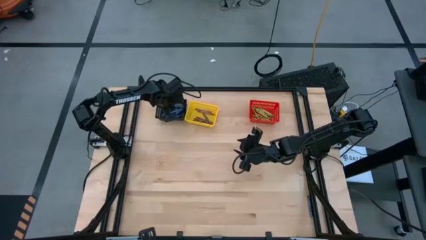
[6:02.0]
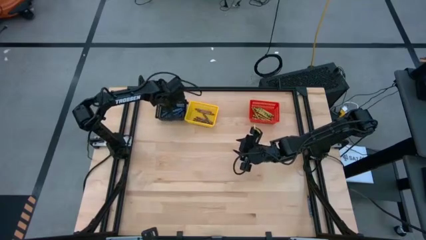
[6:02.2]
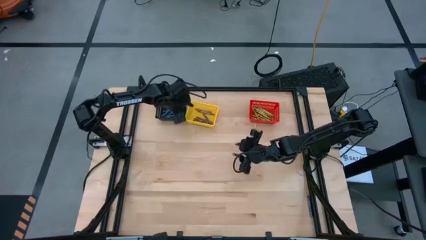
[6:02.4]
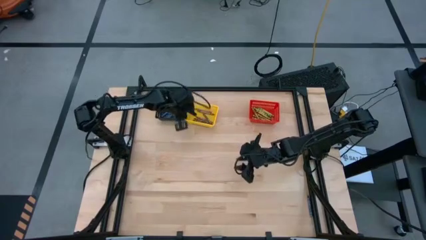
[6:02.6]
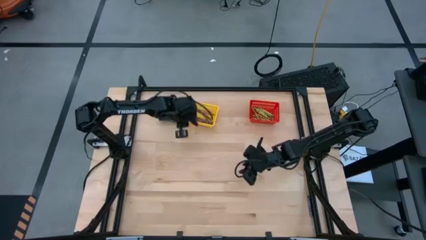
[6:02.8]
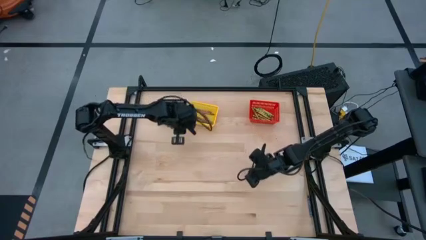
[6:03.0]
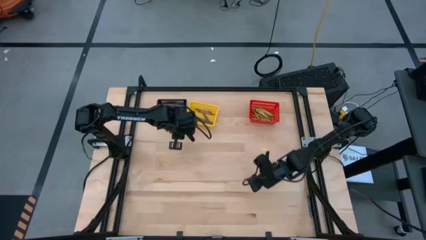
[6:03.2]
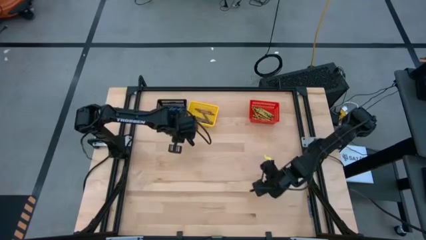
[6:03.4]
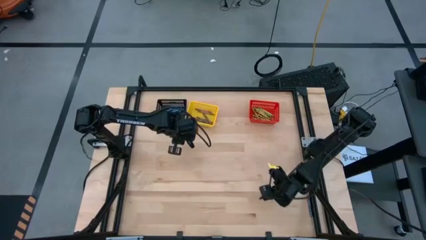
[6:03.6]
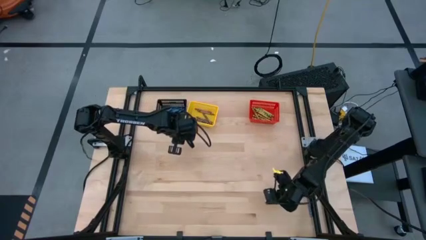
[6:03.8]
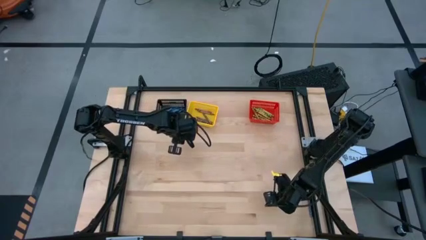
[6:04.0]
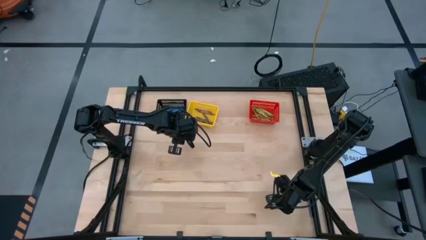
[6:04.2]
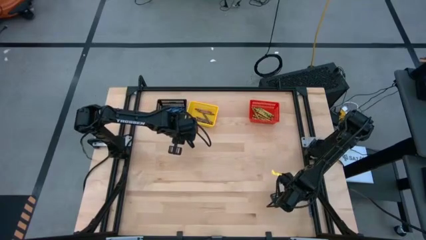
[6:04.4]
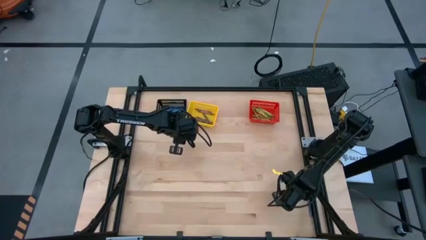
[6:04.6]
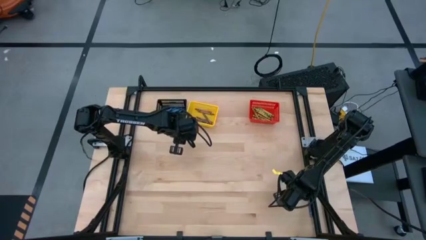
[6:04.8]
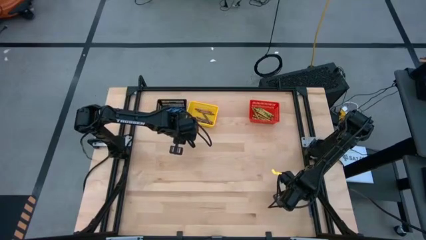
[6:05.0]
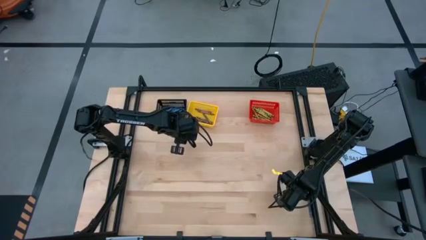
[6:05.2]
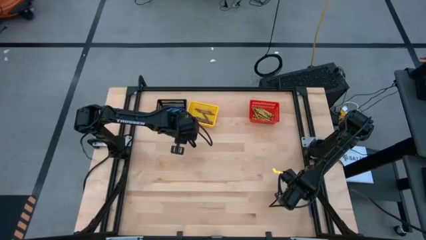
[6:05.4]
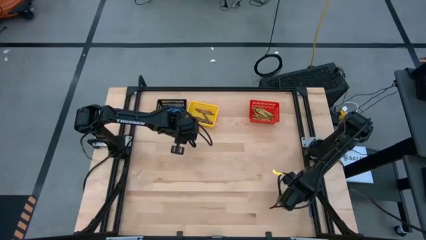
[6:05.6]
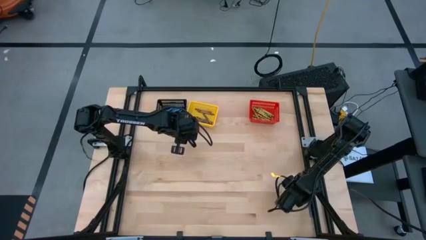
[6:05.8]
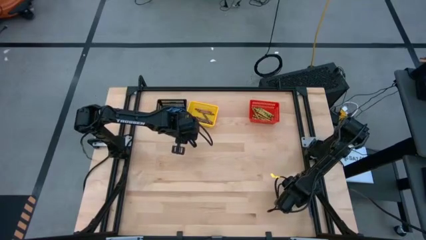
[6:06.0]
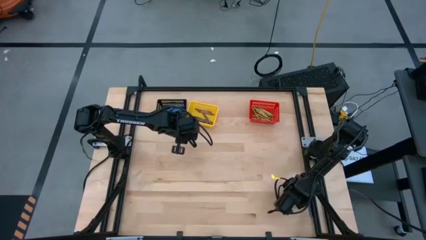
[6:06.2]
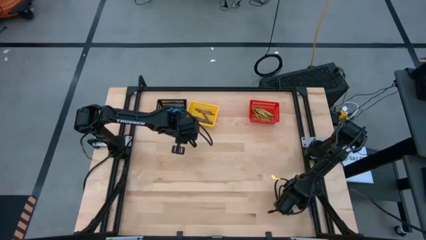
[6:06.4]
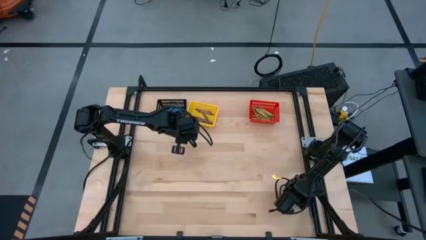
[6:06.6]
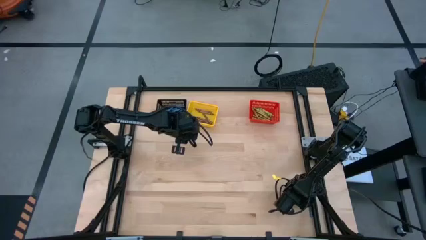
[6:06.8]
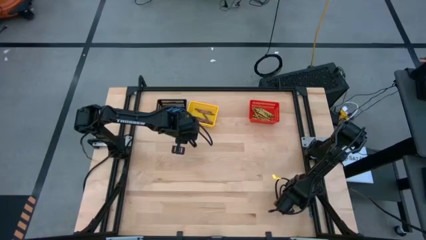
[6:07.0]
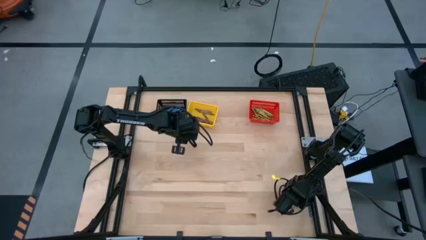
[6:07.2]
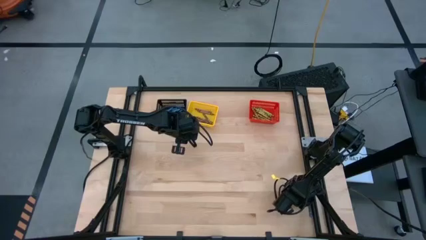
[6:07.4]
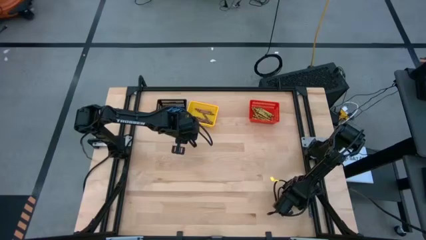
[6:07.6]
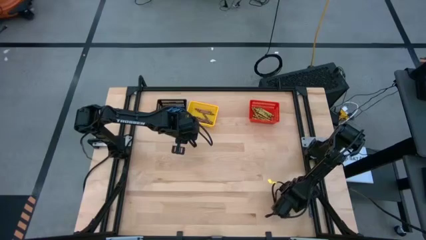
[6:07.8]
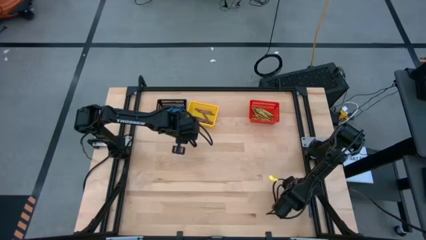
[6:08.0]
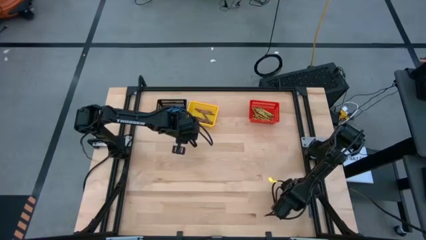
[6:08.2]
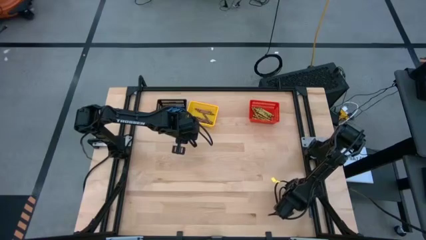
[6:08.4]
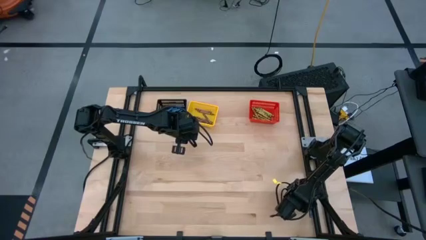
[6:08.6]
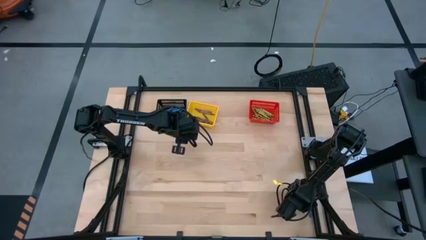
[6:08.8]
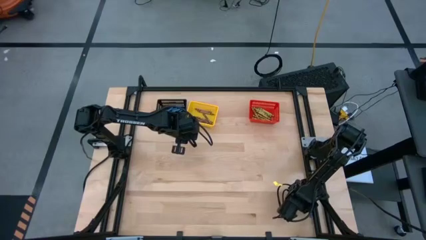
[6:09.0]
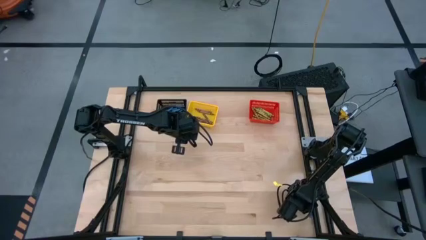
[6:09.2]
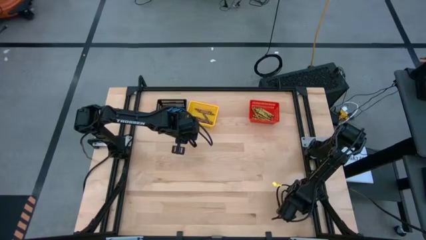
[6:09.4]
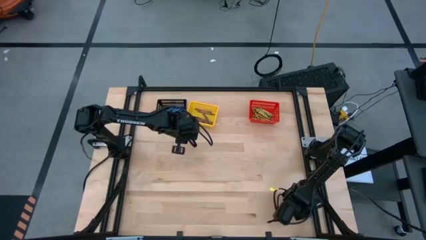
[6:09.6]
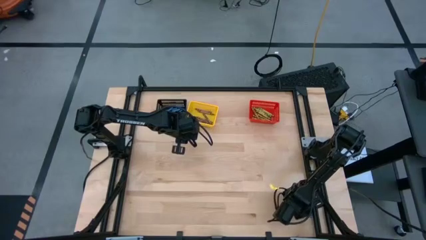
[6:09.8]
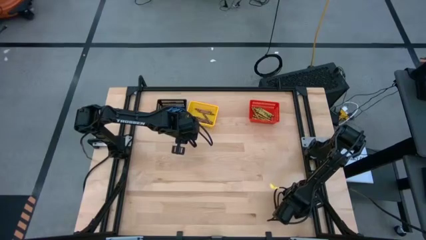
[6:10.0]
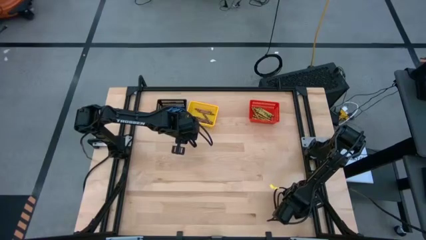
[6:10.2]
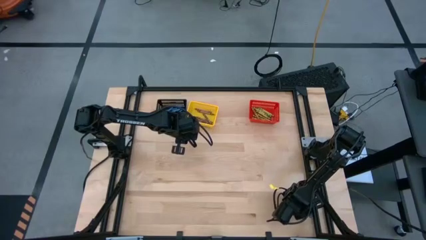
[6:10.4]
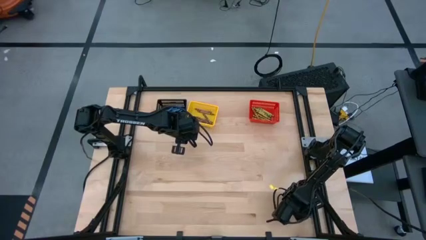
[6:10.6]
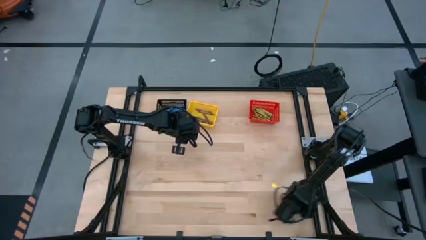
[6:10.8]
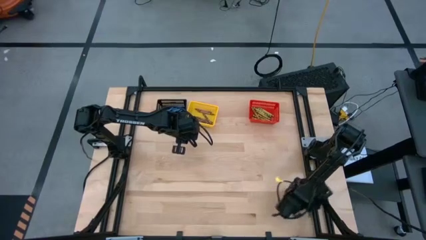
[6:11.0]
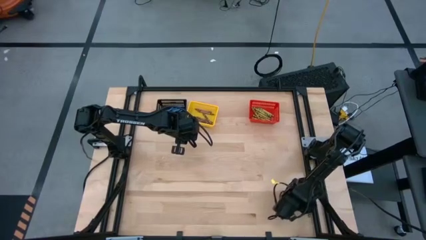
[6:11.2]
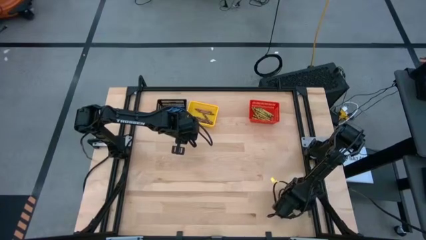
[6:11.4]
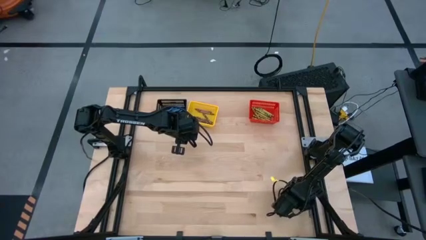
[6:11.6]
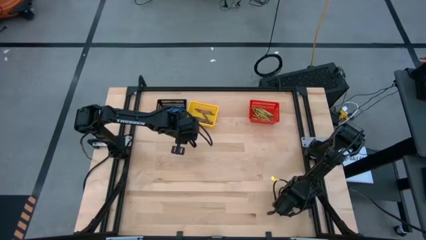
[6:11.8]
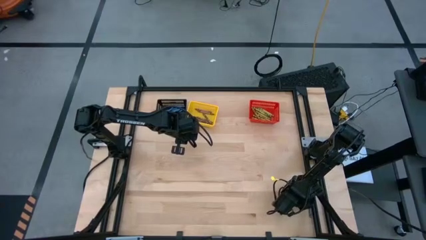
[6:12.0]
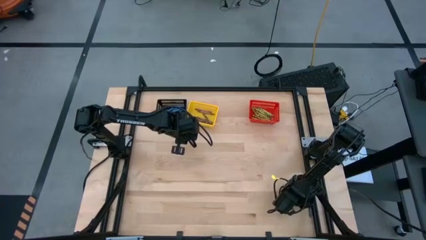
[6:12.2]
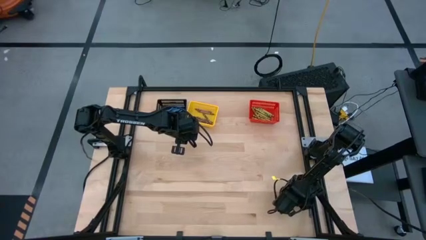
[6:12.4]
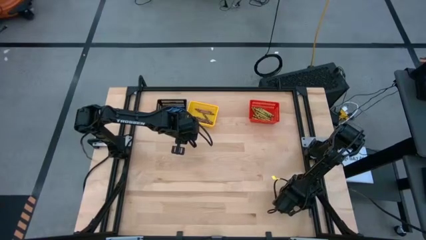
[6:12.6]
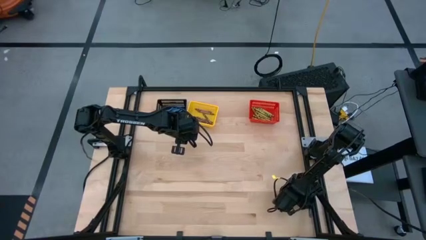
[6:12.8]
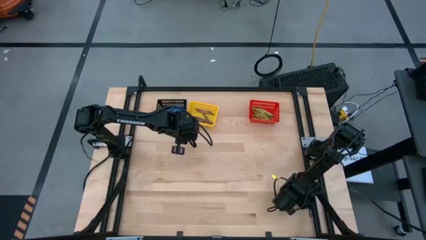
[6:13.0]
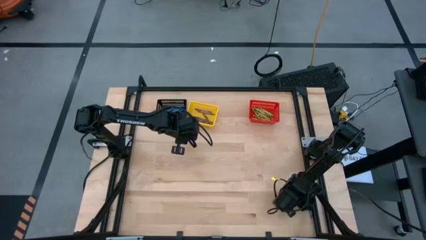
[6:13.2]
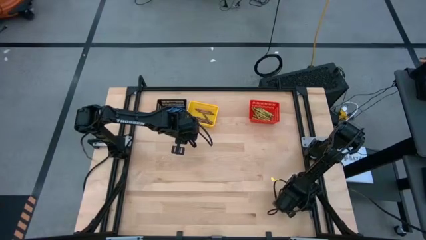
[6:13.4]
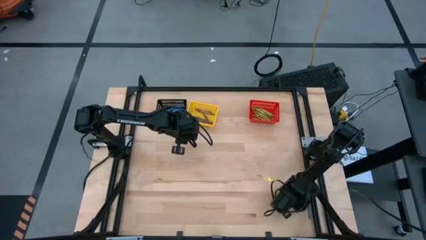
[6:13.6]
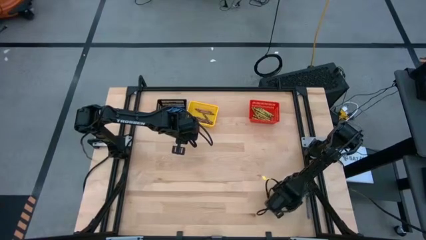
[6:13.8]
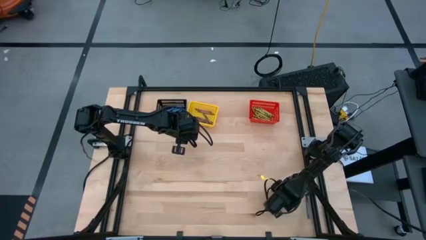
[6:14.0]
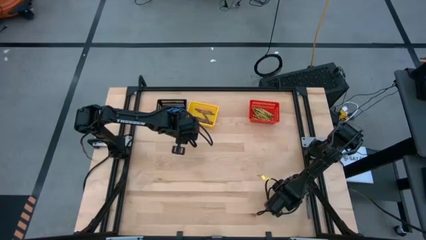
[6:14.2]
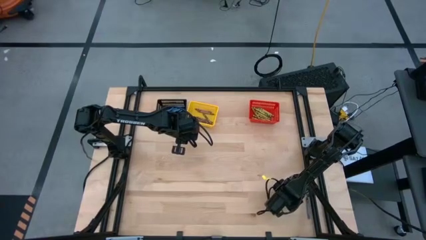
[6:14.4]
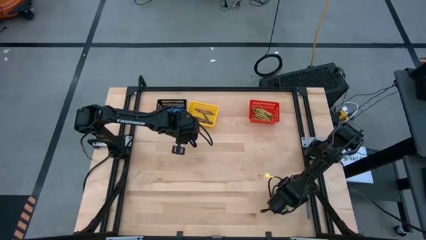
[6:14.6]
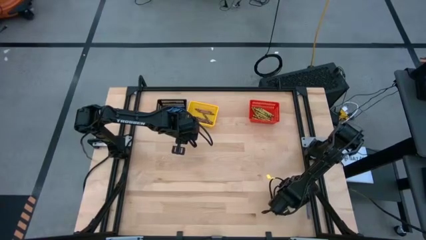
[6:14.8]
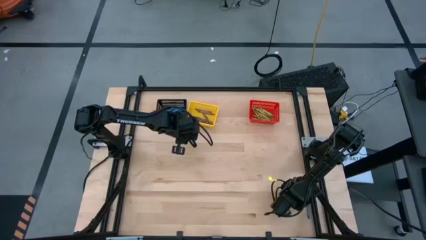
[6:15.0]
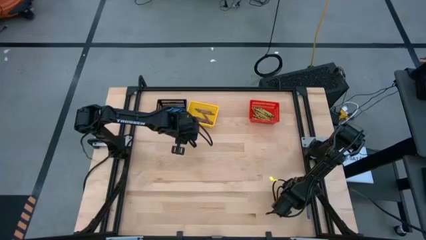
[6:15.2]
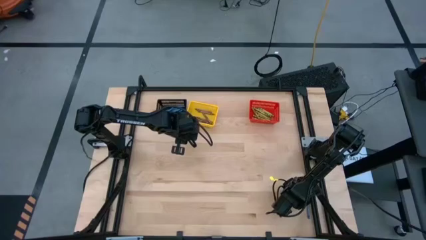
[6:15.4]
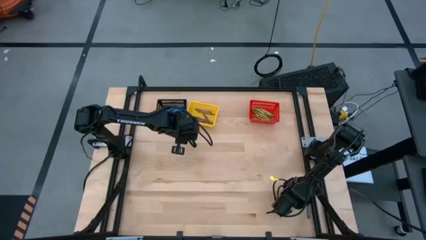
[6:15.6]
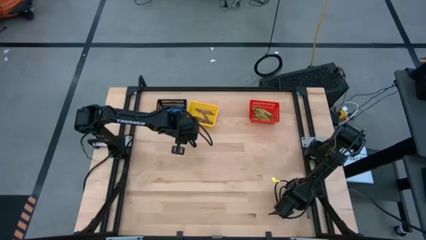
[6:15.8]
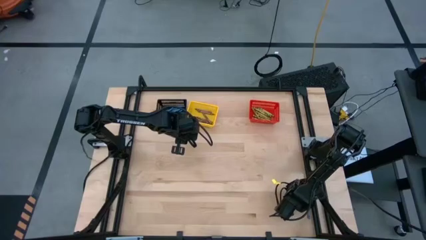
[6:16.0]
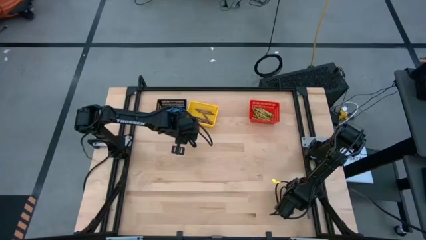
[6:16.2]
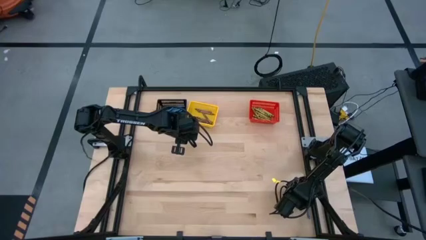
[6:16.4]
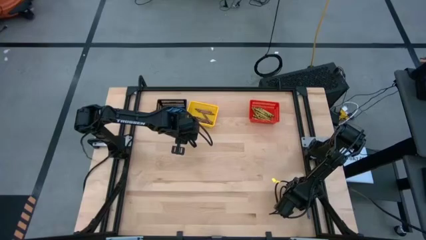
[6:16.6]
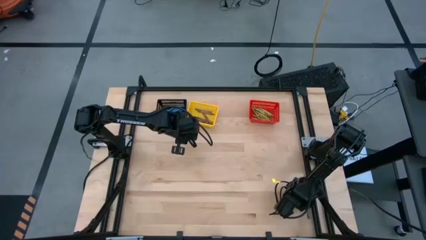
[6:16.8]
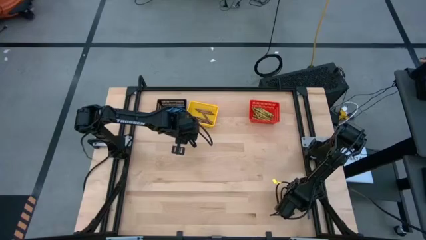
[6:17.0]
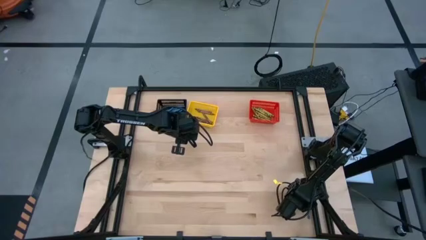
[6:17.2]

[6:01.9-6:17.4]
Task: Sort crayons
Put the blue crayon into the black bin
